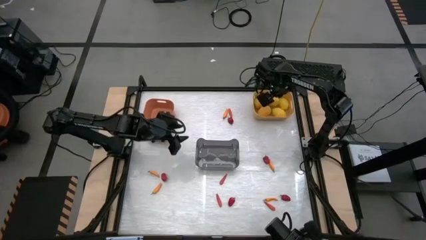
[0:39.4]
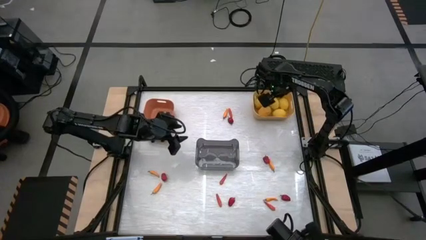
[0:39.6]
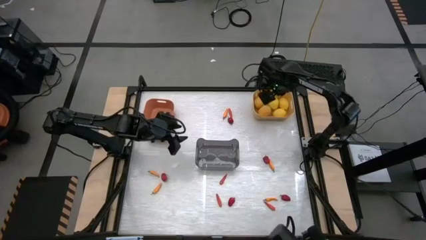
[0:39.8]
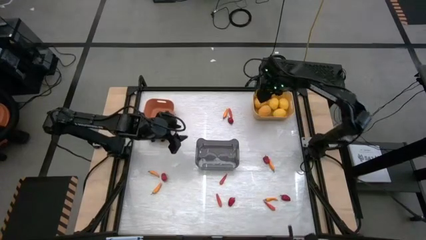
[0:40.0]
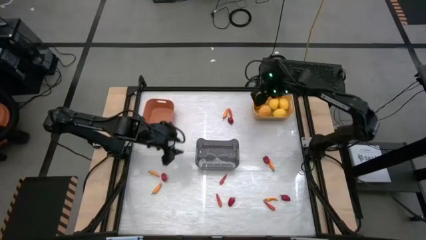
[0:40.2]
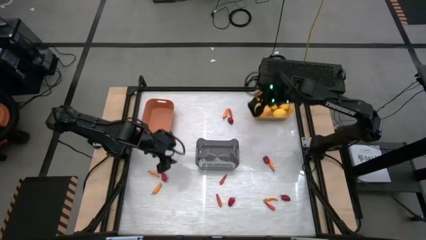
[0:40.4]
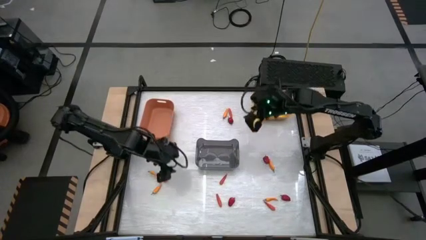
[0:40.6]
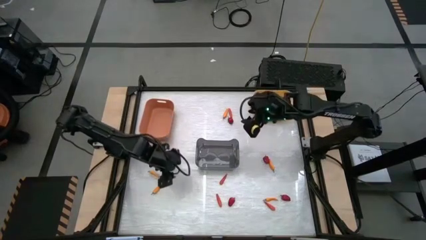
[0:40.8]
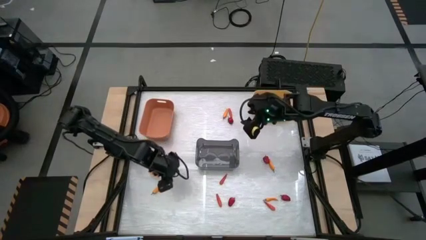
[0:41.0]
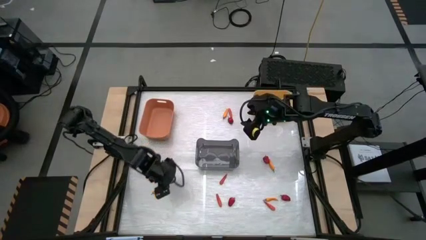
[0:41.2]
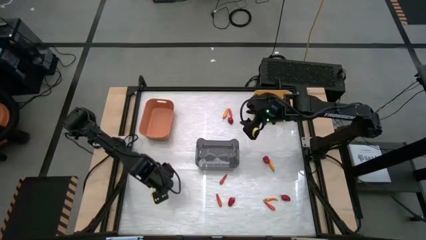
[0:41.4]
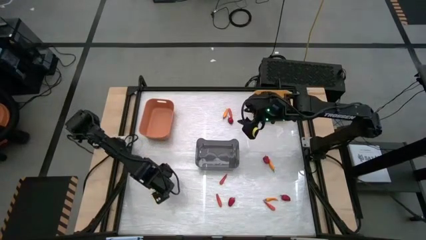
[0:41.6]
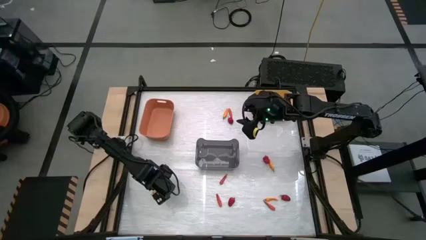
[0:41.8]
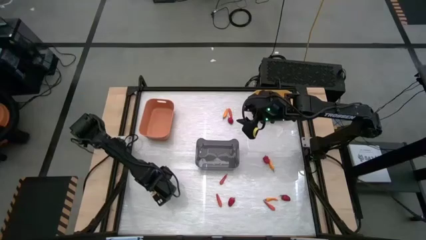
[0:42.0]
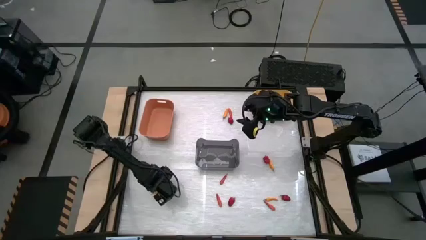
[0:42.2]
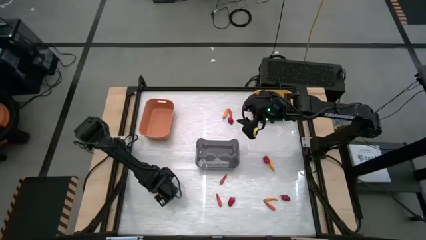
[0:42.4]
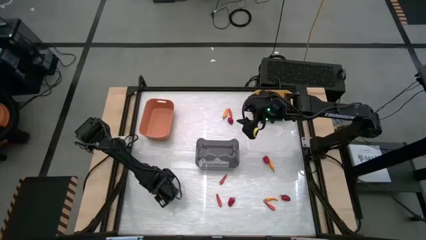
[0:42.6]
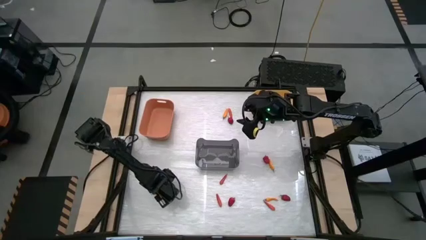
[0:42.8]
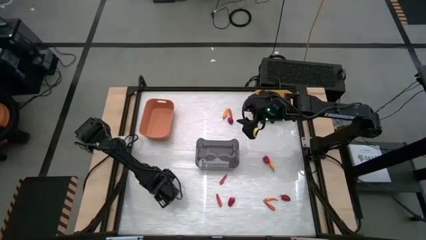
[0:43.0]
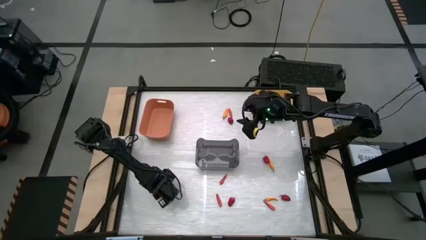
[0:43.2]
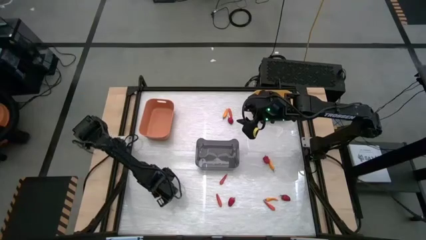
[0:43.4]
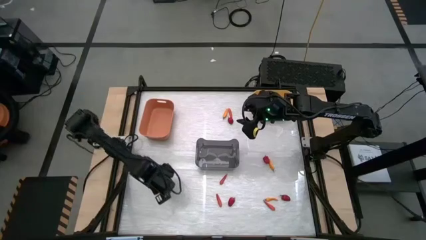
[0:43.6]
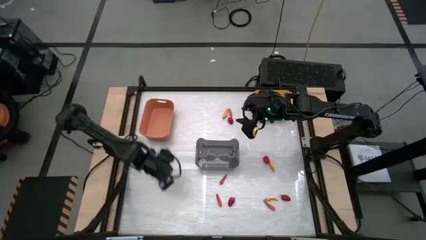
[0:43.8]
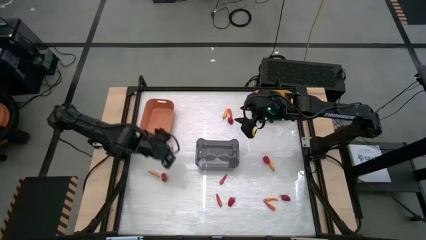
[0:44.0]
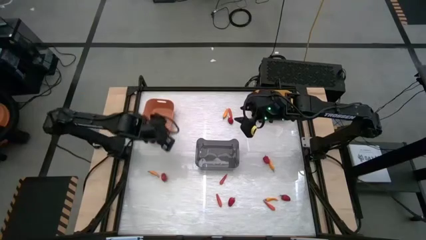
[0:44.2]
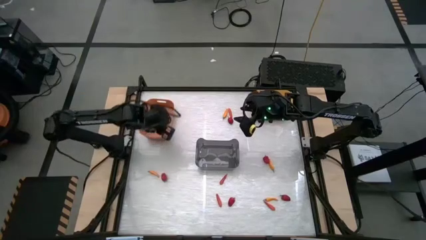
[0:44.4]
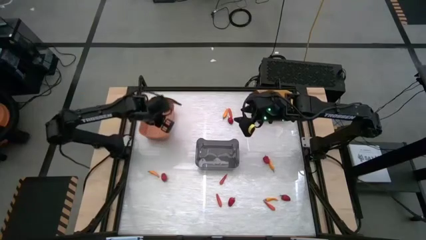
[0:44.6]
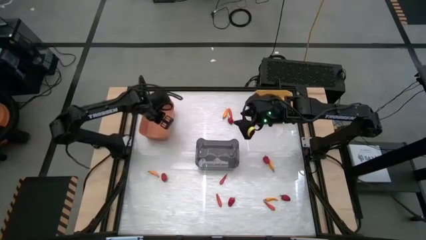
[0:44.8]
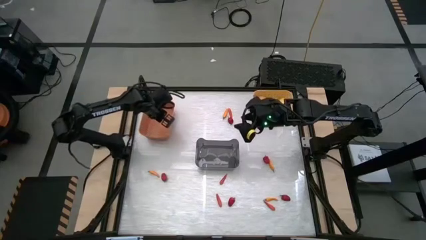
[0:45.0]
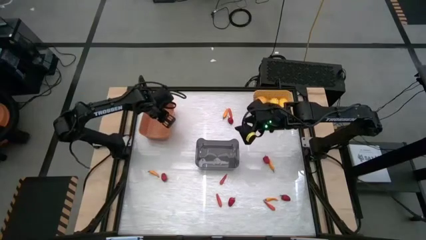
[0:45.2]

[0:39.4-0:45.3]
Task: Sort produce into baskets
Put the yellow chili into the orange bin

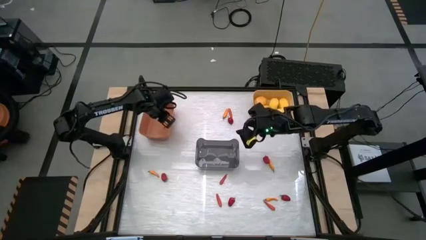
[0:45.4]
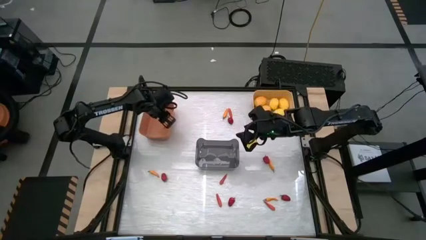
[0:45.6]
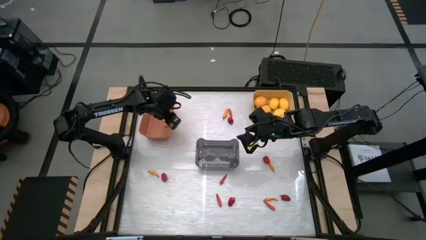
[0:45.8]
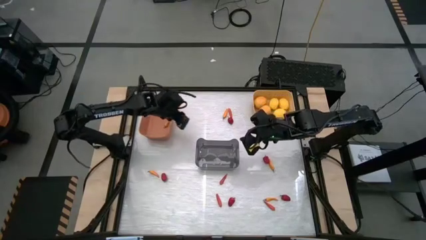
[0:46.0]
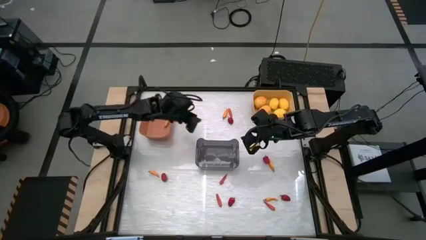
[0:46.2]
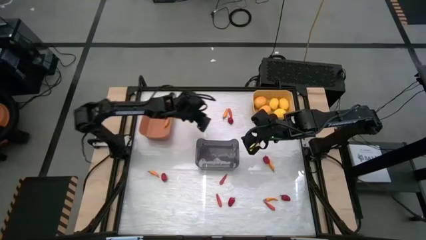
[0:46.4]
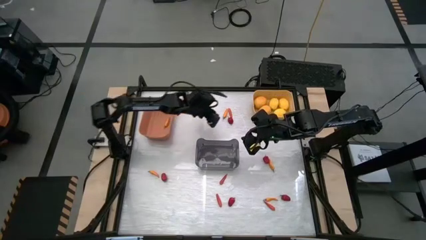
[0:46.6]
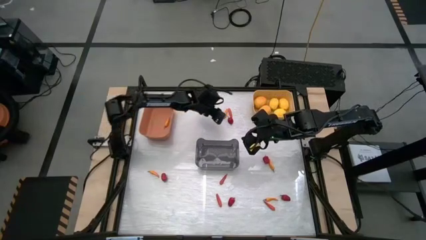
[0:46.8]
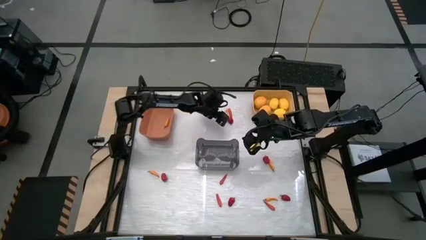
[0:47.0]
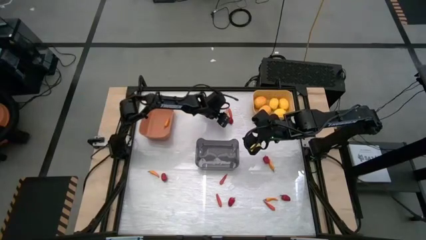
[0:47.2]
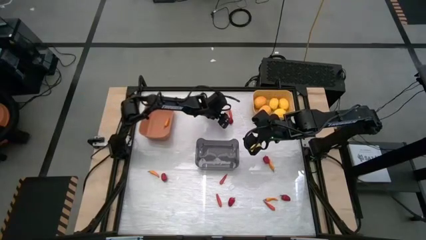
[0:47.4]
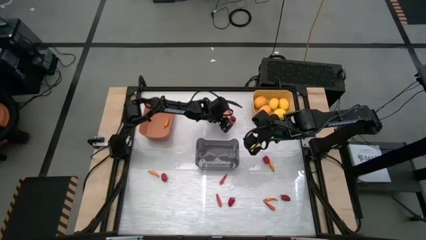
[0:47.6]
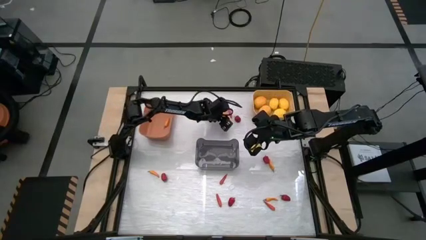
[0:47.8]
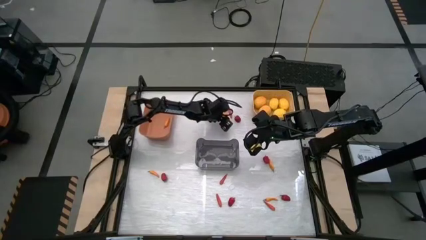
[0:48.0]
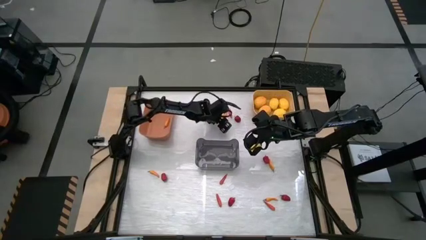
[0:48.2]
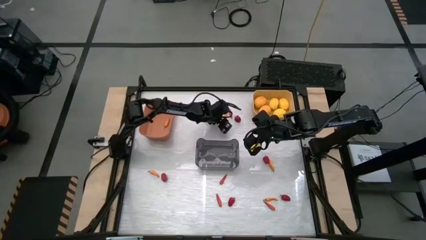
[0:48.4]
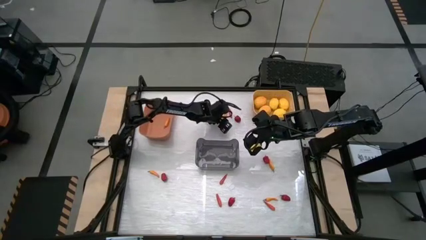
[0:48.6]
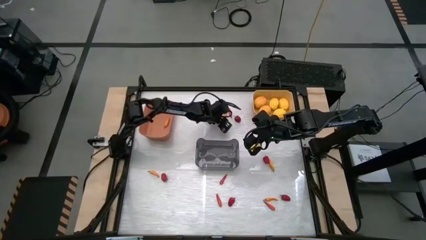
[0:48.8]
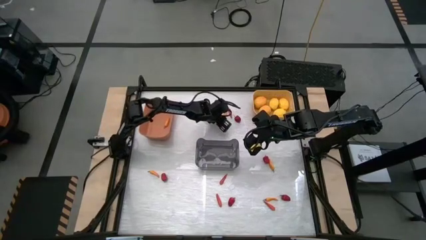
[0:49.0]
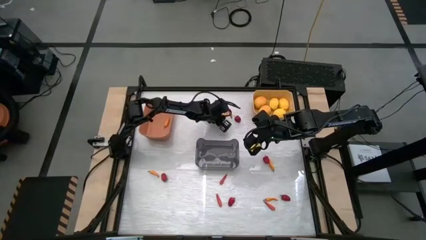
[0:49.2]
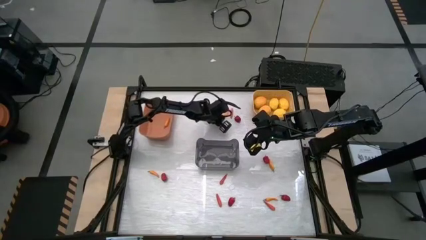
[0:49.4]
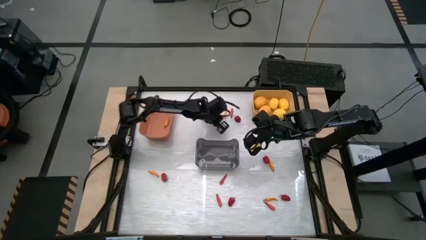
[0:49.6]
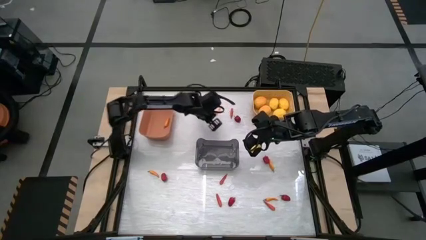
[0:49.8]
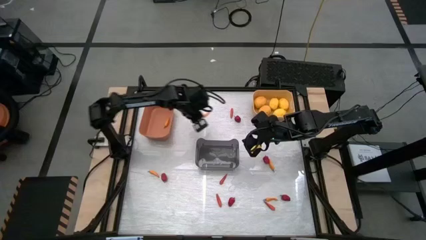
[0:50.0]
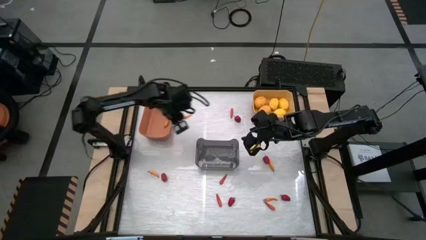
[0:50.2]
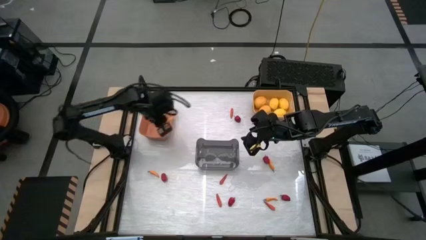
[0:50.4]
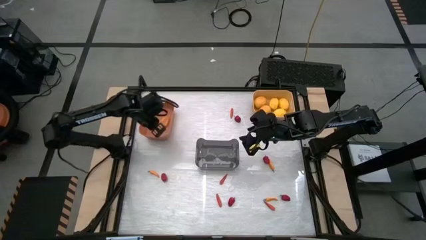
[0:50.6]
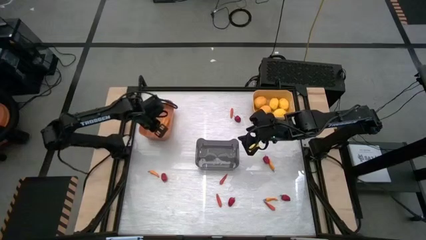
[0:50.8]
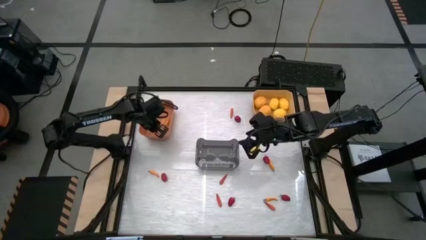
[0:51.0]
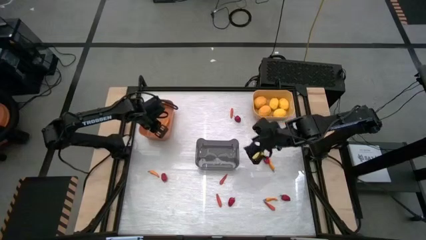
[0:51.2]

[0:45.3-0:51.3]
Put the yellow chili into the orange bin

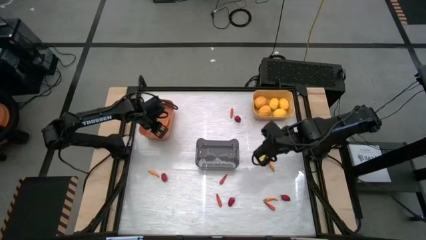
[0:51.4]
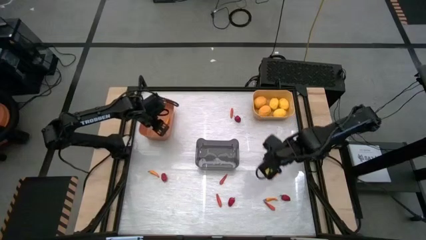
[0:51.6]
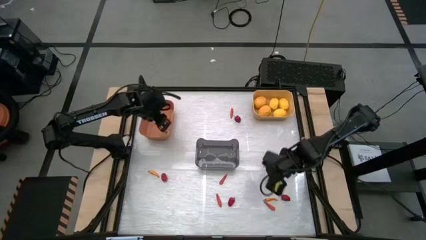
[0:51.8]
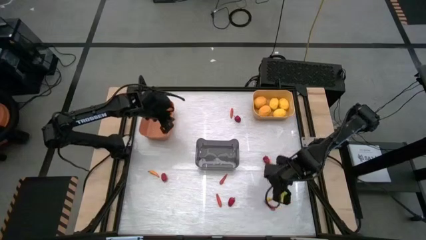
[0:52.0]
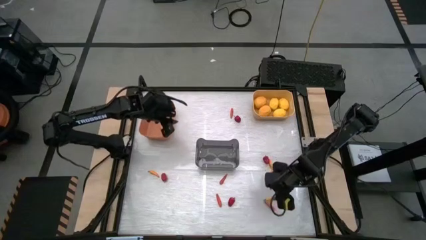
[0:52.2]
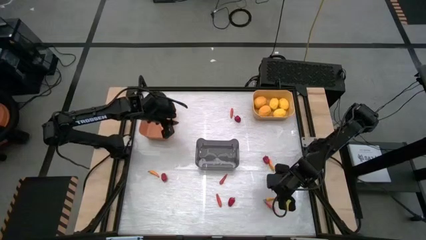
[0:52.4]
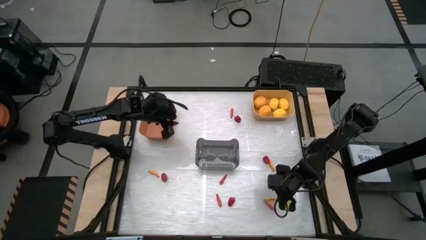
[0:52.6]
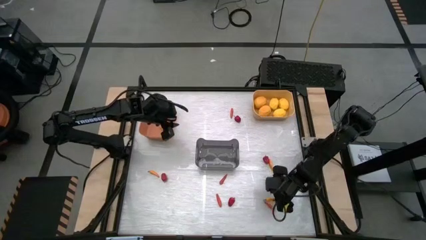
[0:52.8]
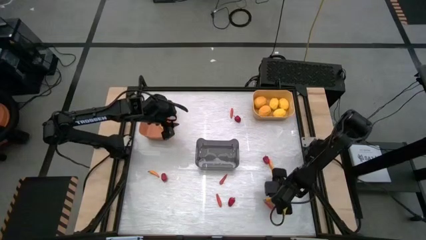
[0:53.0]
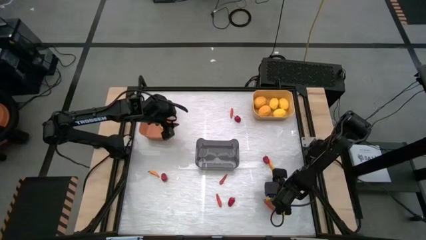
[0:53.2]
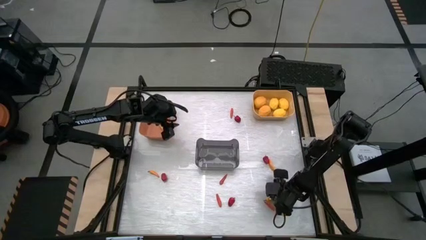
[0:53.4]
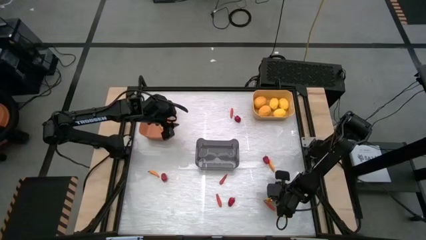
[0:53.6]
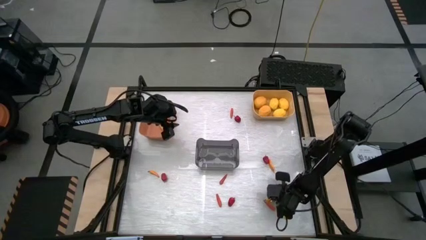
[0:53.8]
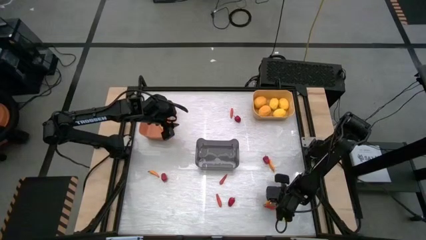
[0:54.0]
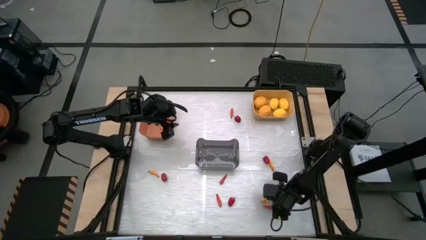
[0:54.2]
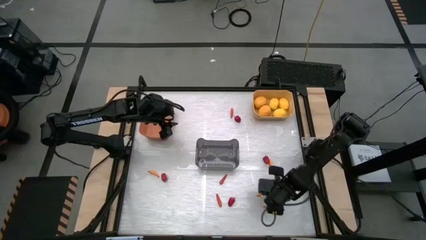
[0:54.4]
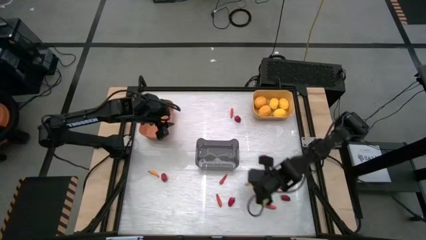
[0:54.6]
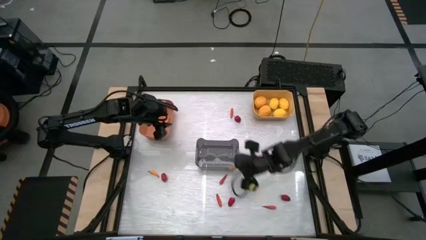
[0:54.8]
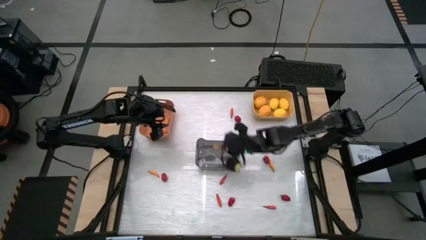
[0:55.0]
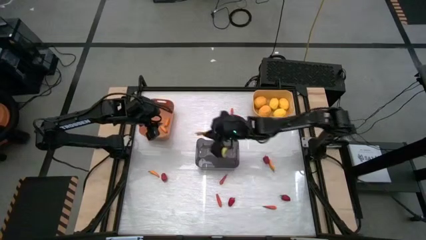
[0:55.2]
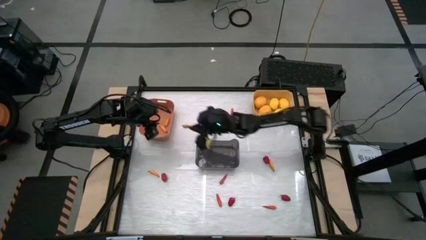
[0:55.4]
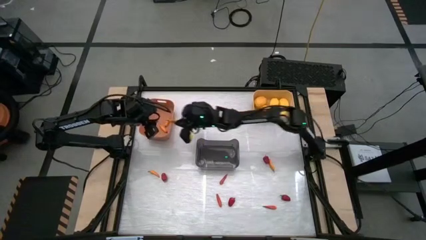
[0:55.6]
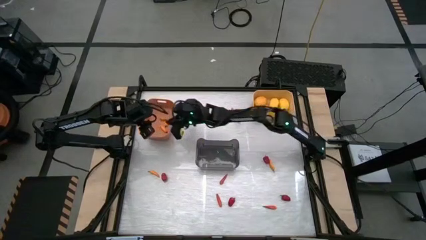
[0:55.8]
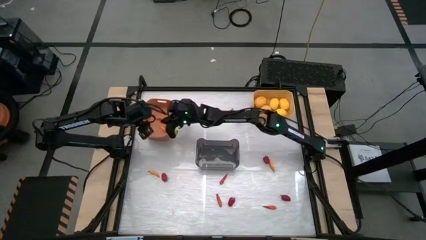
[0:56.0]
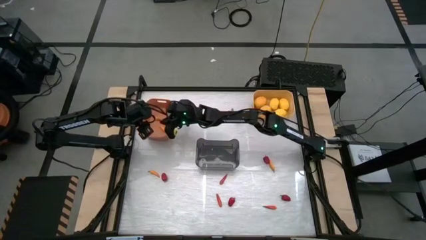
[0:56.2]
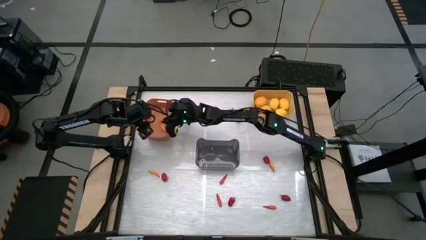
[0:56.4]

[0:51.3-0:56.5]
Put the yellow chili into the orange bin
